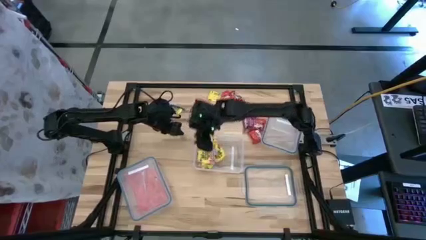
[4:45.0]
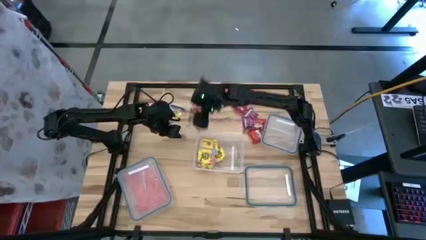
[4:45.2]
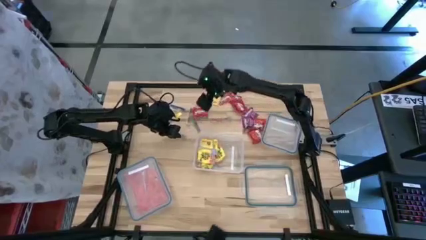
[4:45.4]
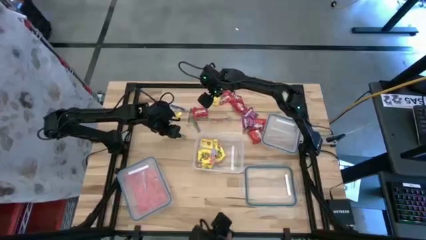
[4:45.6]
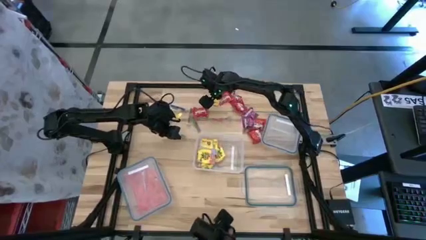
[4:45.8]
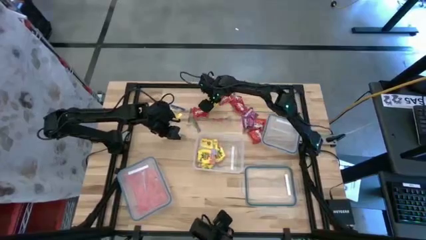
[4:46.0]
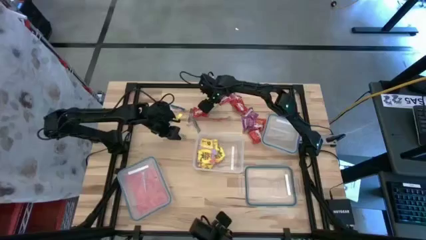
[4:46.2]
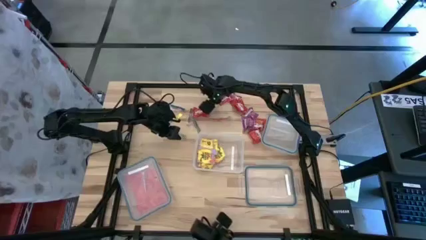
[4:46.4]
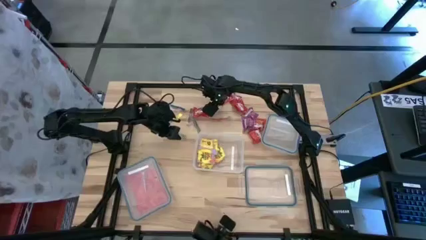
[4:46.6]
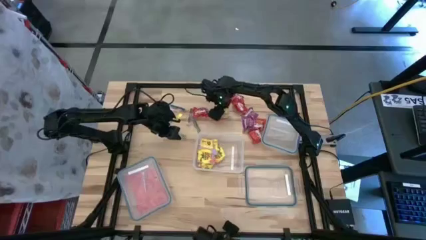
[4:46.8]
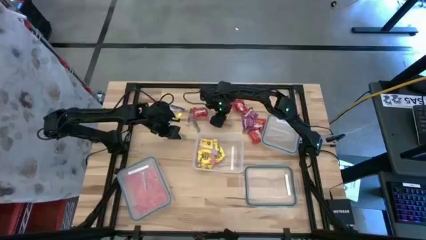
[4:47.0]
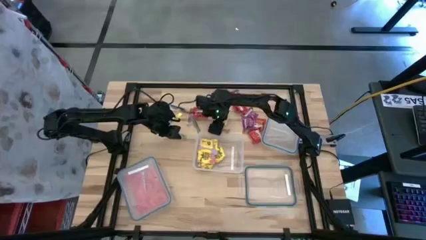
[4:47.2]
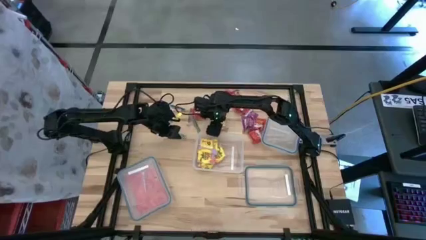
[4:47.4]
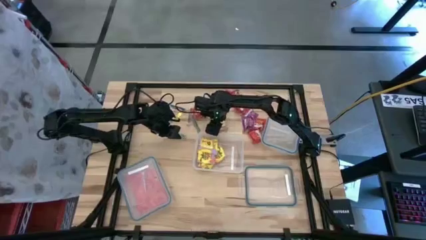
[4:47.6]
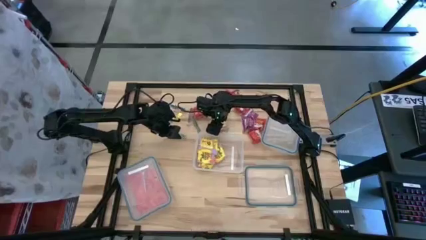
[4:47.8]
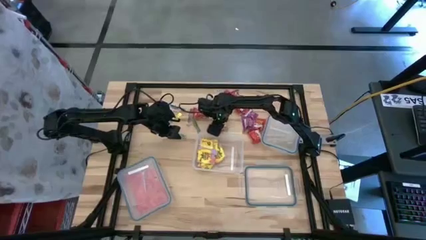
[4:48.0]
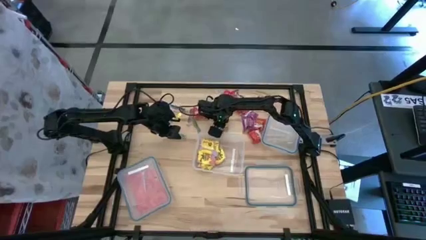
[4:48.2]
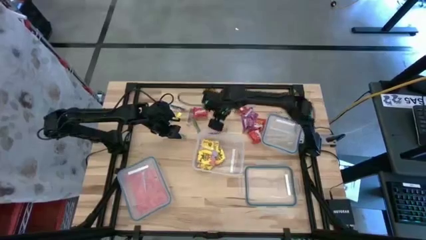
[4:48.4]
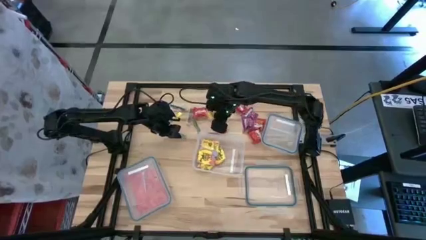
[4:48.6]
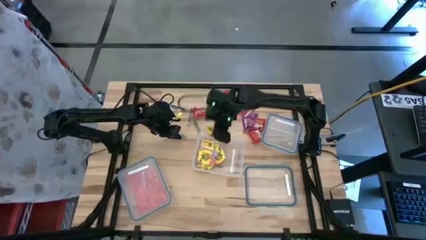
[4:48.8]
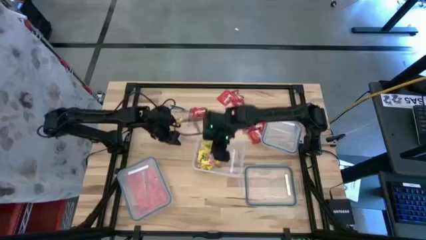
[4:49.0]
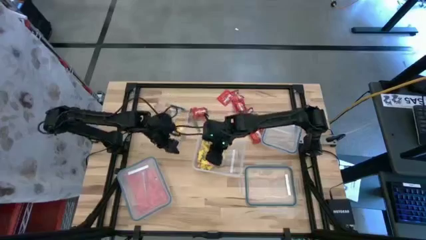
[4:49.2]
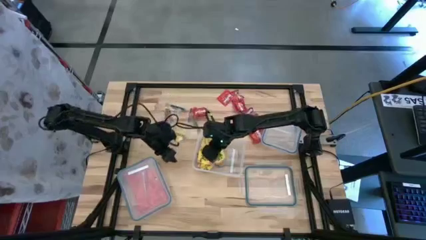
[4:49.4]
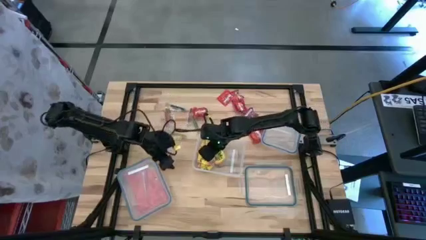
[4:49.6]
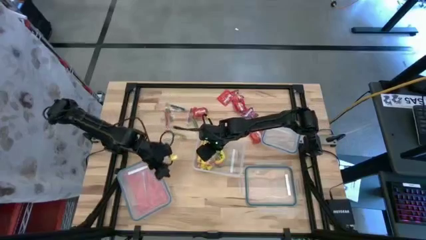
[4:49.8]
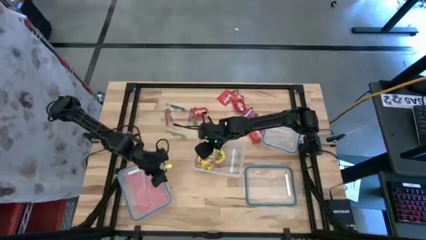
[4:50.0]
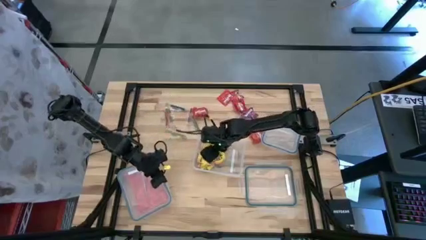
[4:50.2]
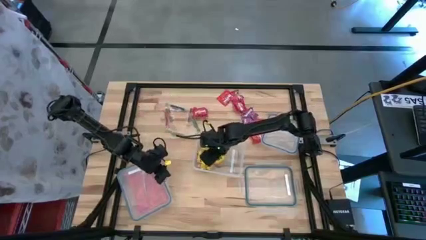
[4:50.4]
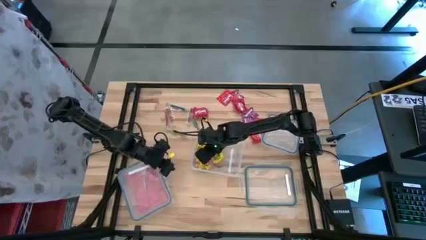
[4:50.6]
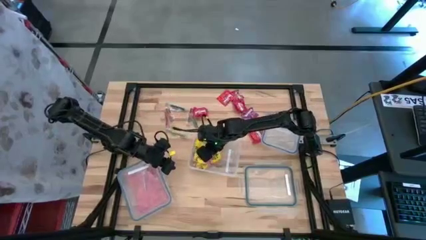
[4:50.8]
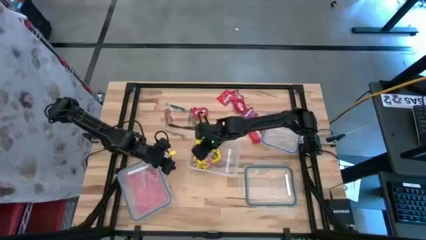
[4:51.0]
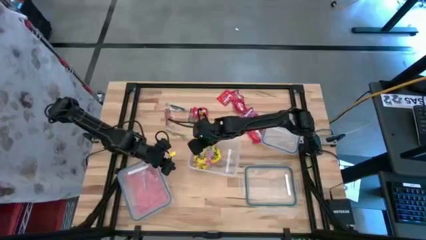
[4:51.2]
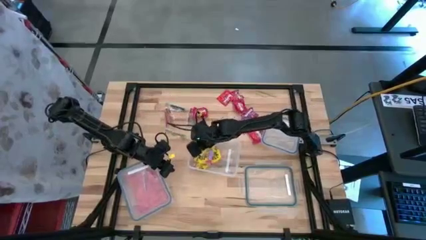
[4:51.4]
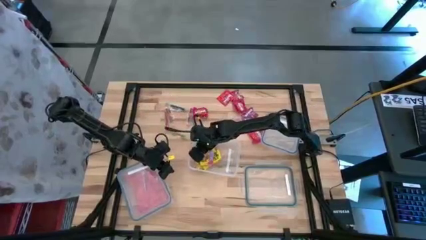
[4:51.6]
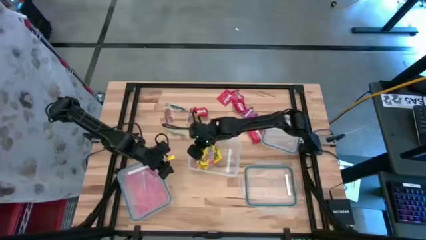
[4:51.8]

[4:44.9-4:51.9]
Task: Sort candy
Put the yellow candy into the open transparent container

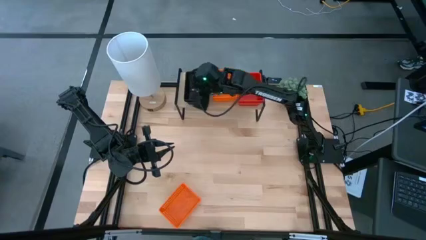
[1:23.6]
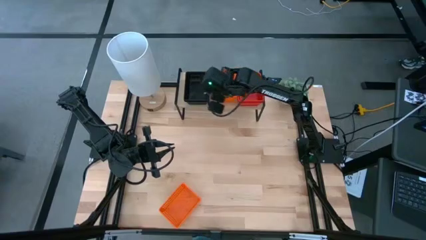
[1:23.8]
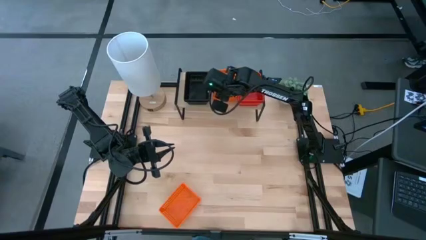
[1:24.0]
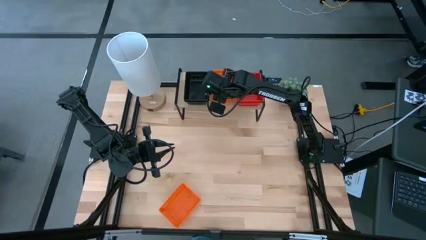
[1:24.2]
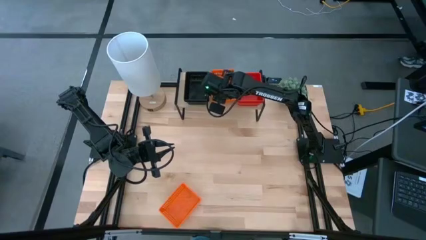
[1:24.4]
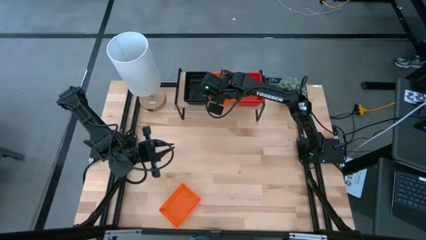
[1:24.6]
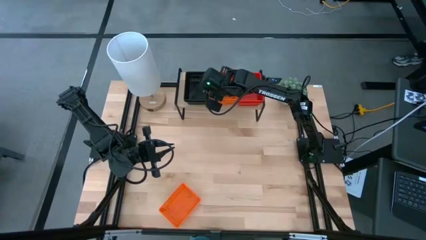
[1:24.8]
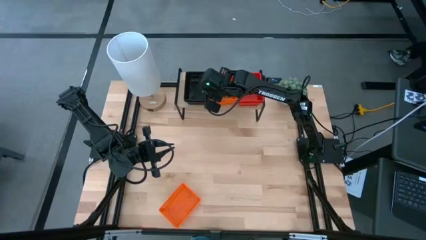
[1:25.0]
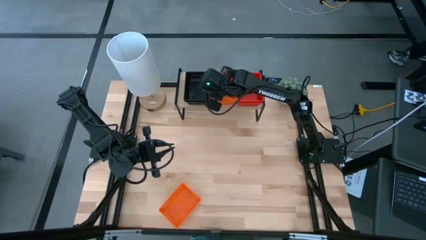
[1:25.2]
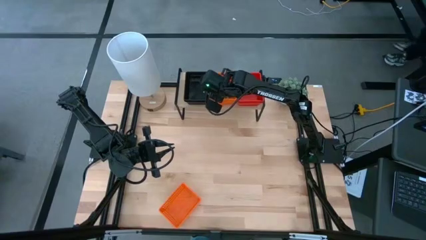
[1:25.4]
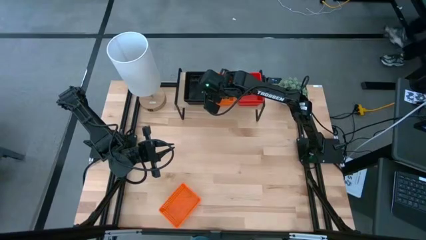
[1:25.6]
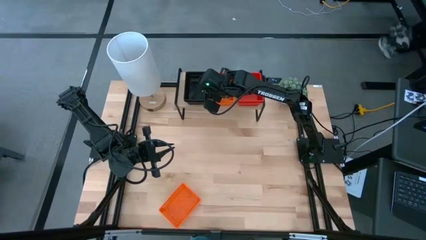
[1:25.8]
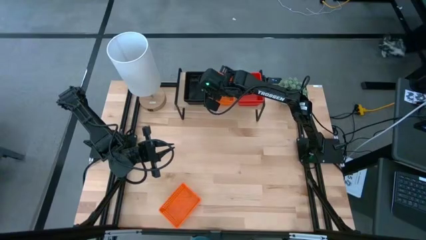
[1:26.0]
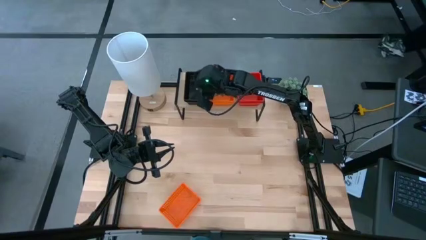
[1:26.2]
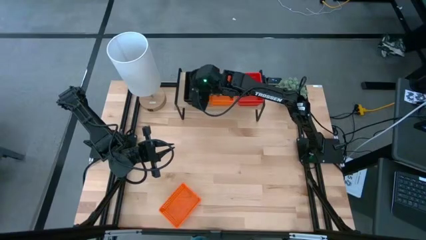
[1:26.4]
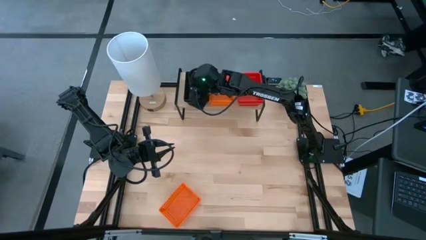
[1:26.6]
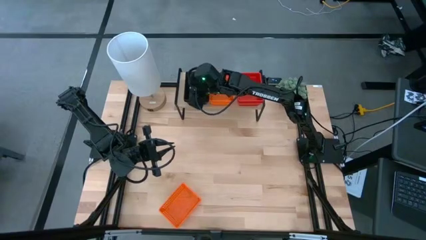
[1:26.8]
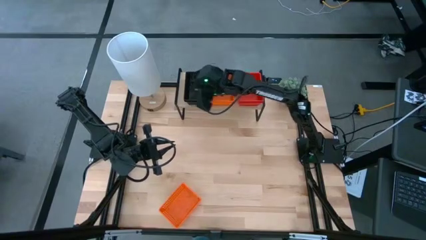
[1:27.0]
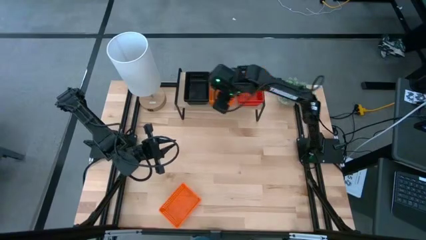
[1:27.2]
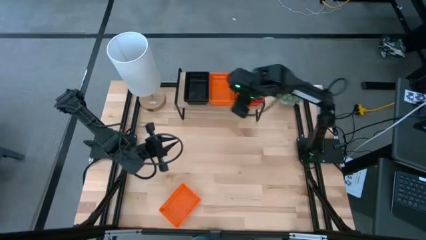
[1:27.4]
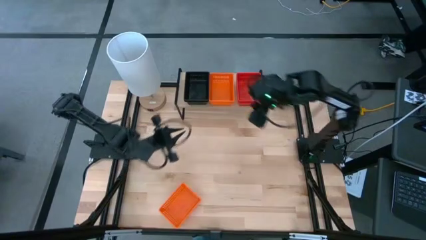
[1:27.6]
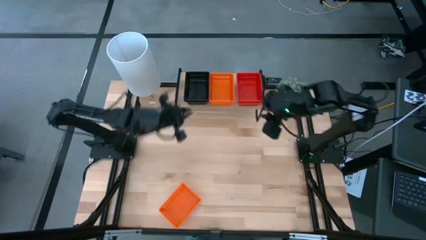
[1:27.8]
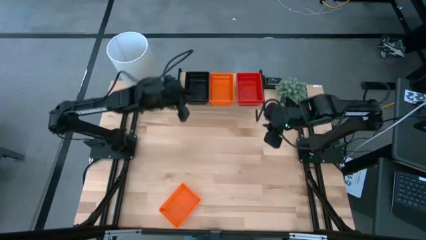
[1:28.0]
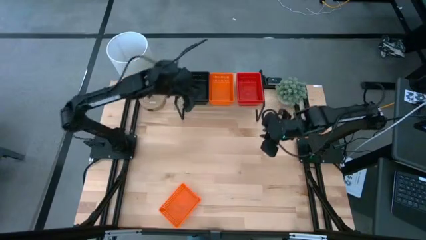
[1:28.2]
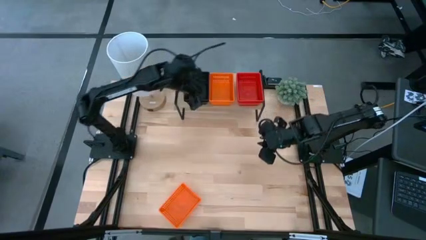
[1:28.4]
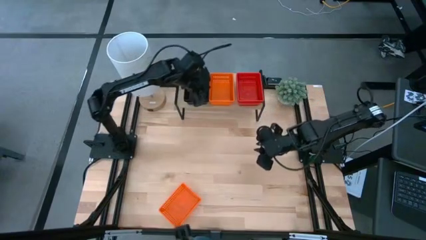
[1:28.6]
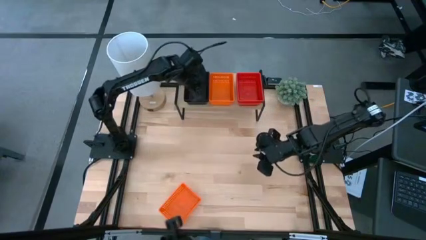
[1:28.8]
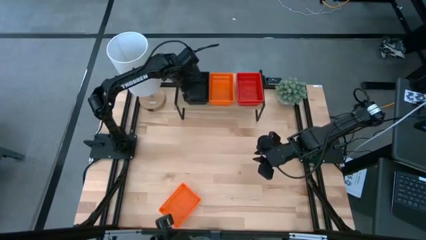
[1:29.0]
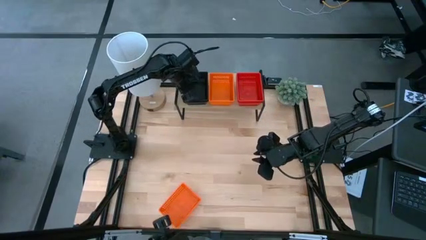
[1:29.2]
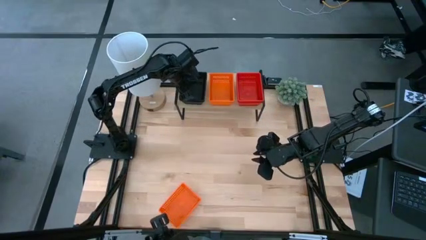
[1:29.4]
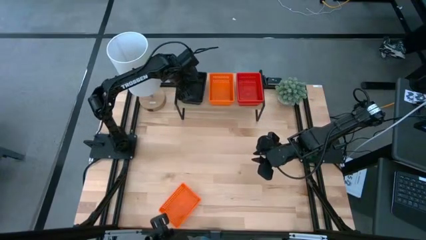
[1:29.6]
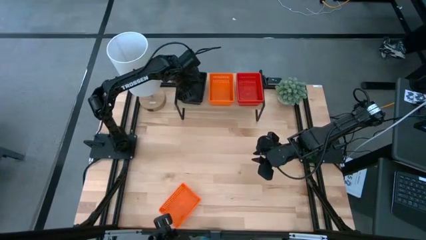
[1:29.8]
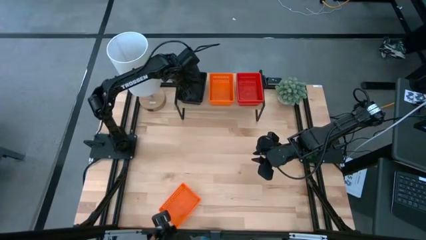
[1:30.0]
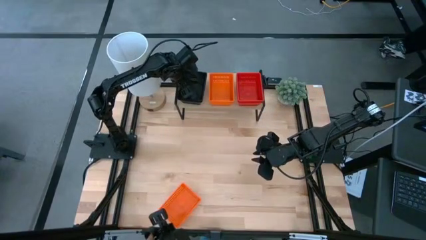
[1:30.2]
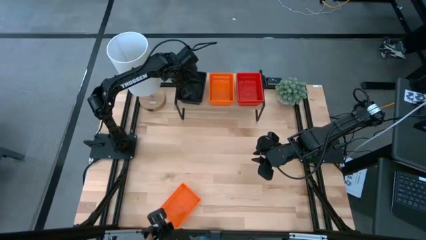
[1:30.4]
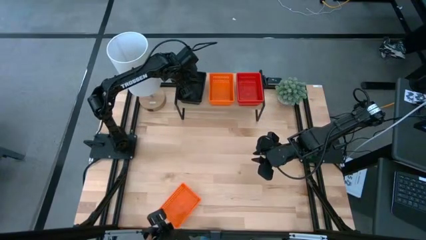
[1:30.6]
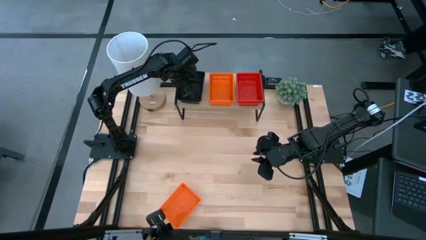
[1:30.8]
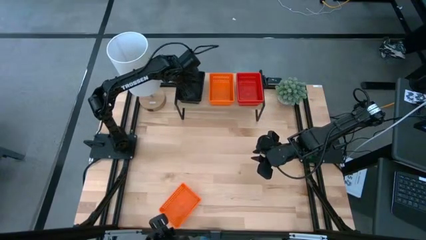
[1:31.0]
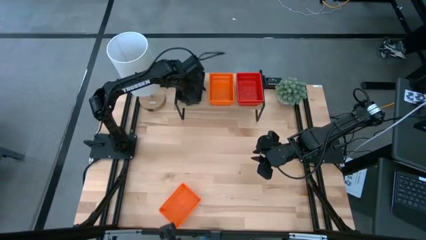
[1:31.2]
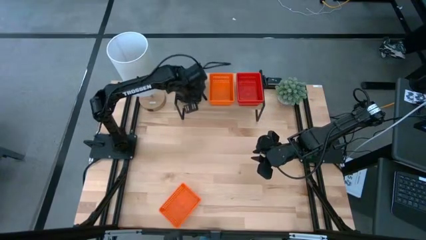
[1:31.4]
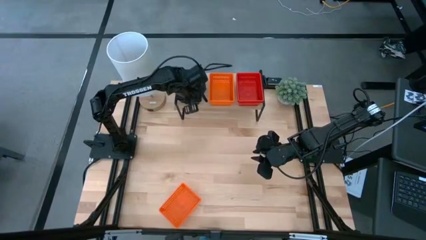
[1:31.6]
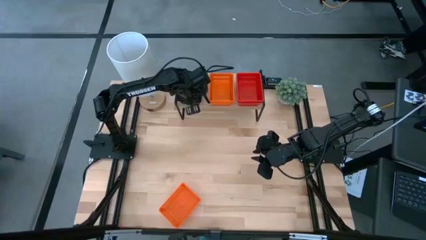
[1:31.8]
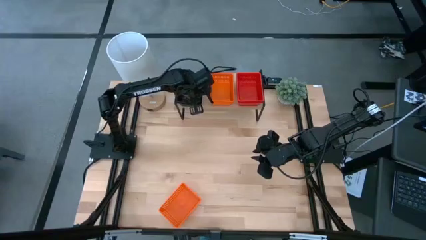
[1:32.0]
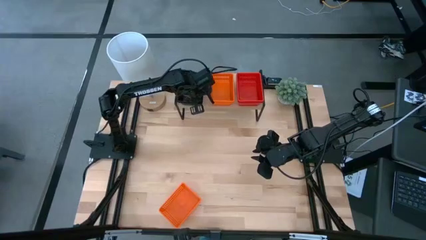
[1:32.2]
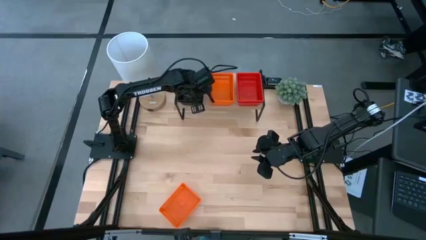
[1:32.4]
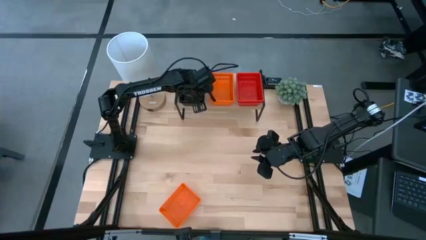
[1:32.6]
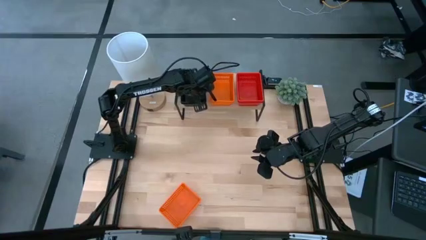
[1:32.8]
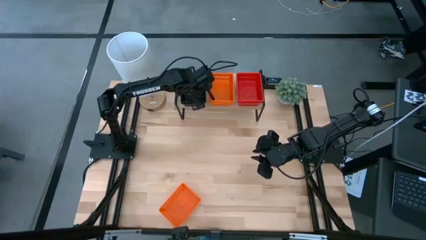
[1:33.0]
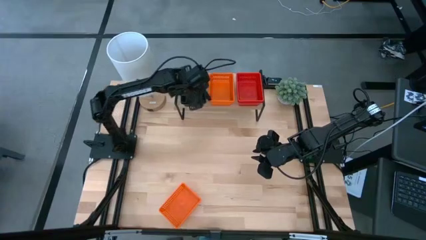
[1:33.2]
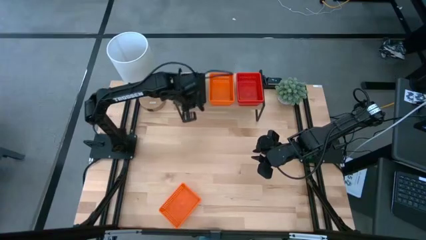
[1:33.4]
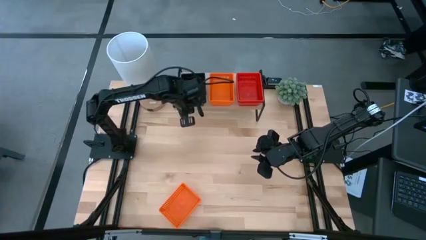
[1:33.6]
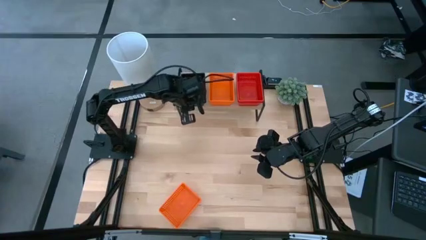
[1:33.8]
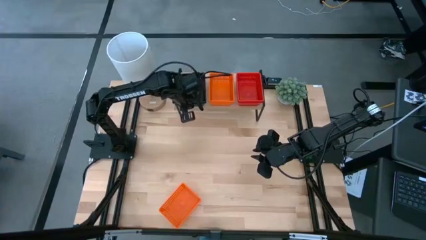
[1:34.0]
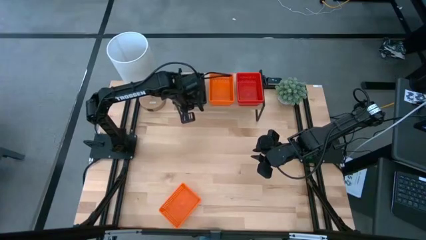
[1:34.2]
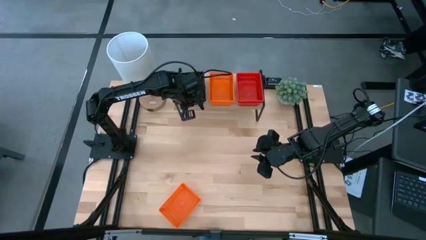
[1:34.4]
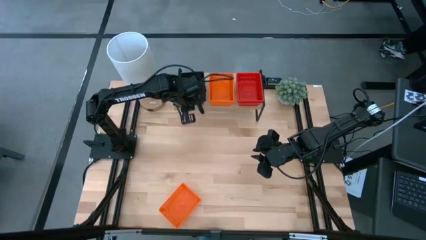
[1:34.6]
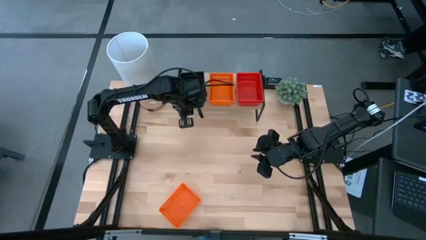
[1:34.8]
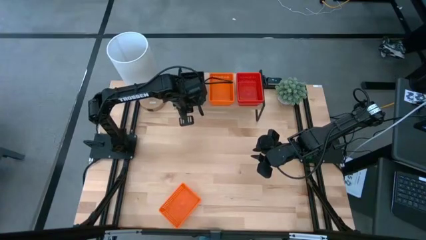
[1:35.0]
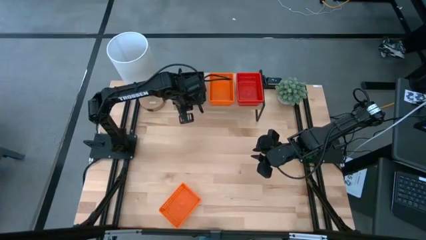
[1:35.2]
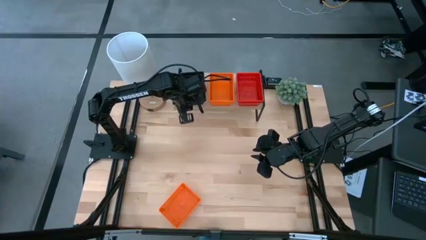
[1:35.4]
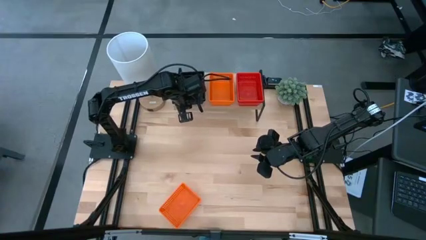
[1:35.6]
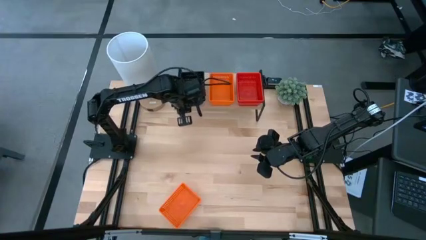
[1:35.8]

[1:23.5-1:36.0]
Task: Stack baskets on shelf by color
Adjust the baskets on the shelf
